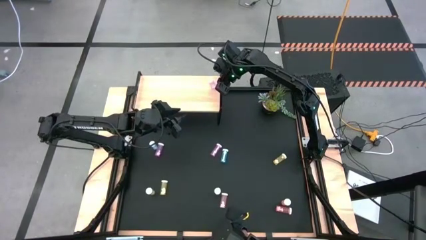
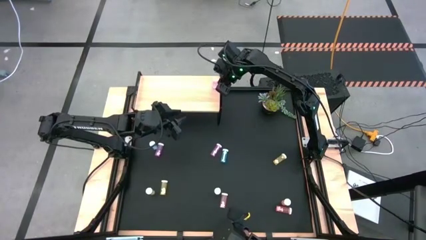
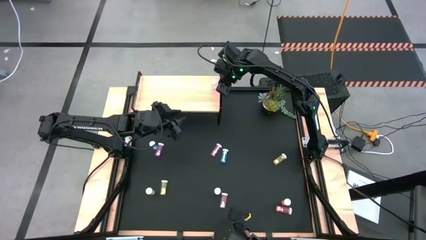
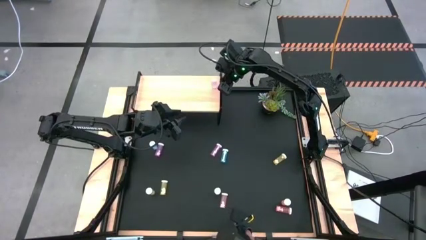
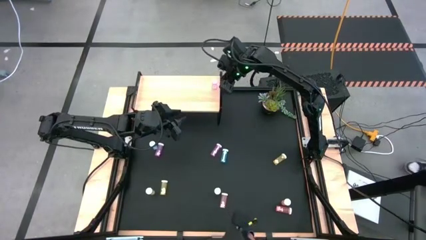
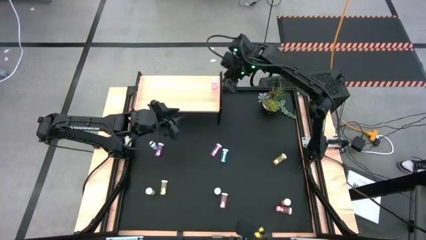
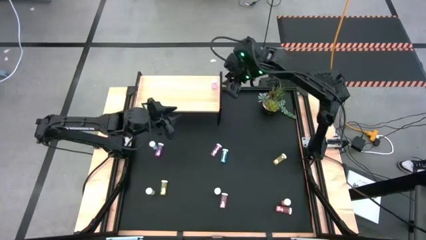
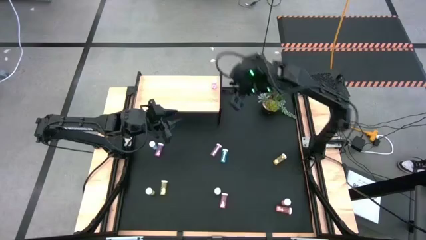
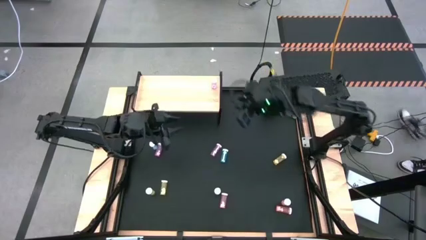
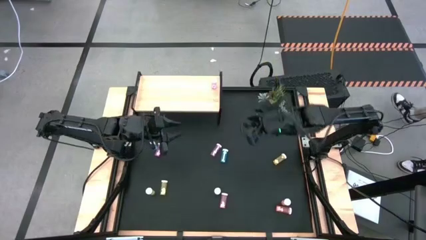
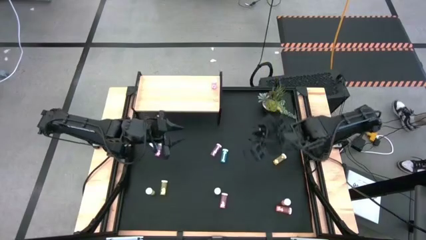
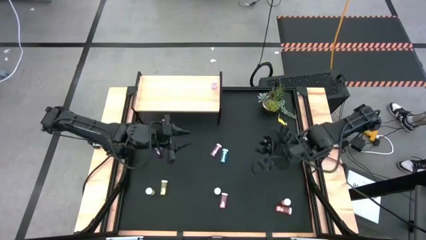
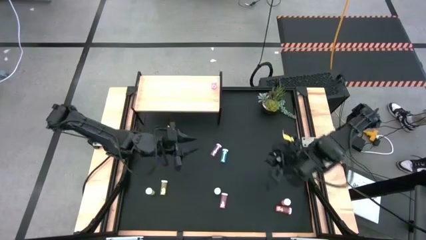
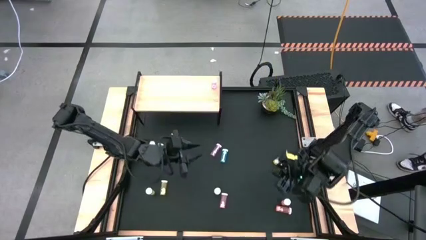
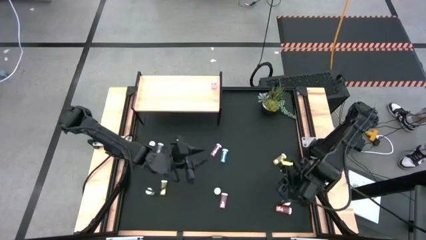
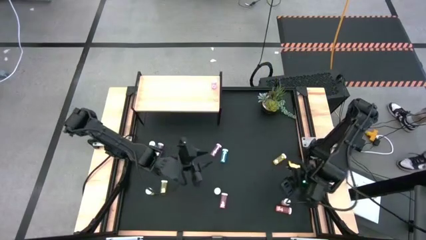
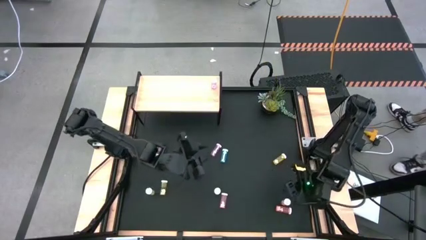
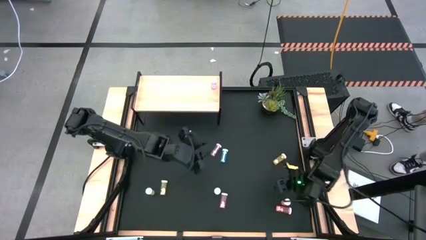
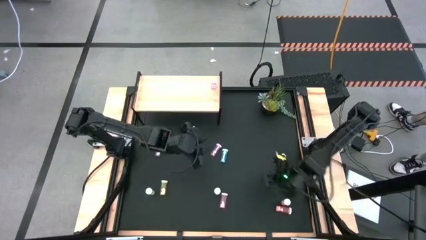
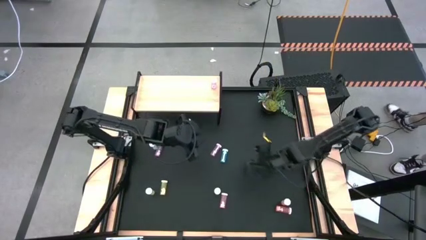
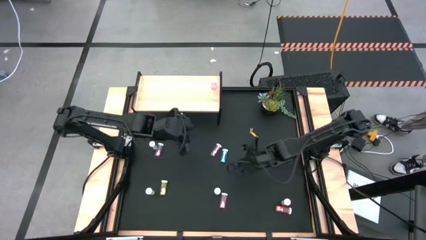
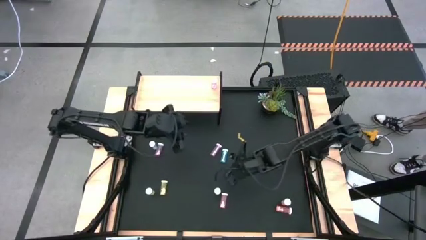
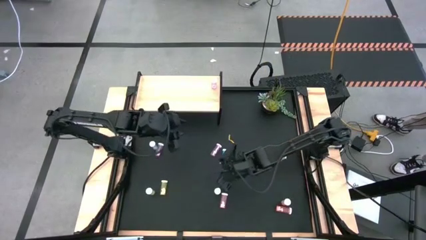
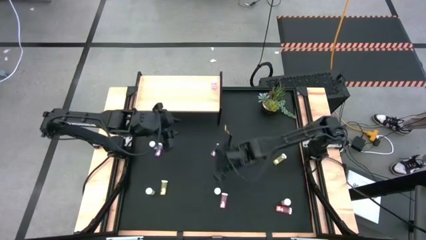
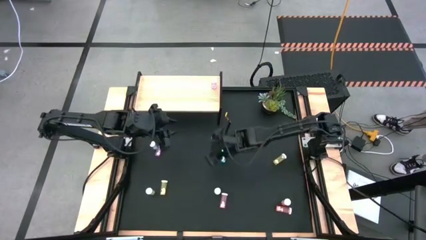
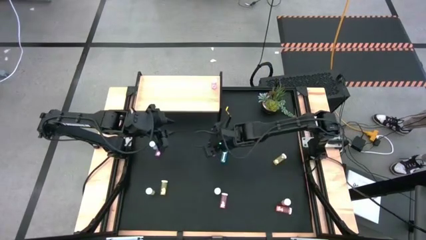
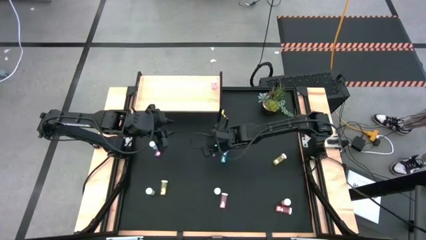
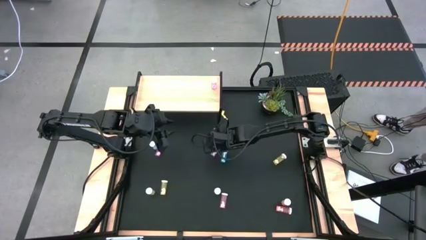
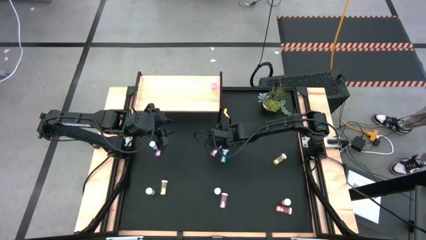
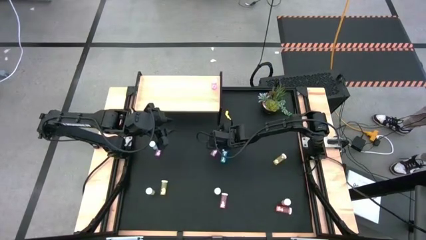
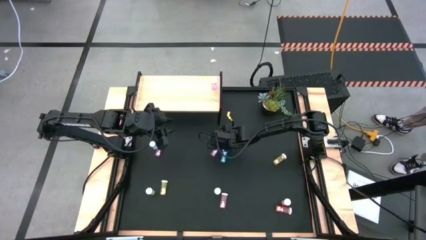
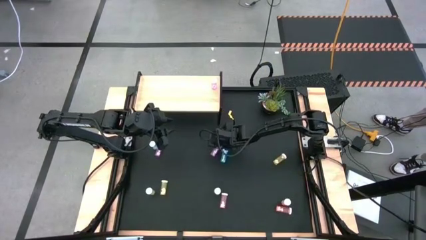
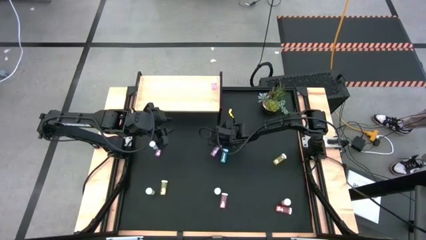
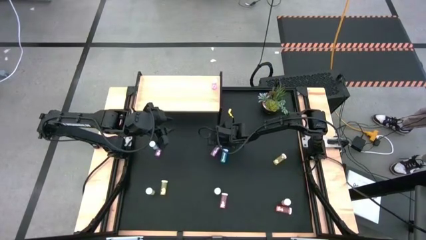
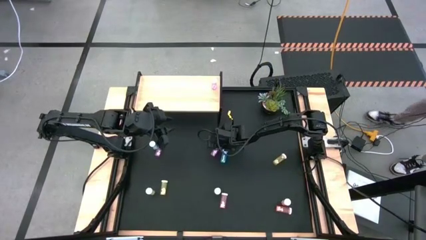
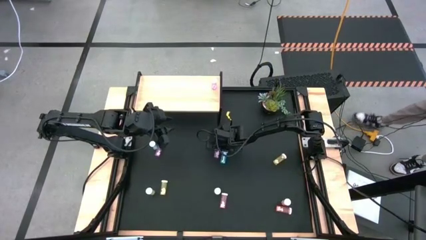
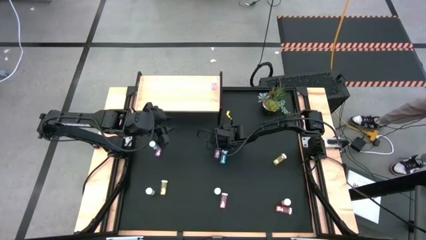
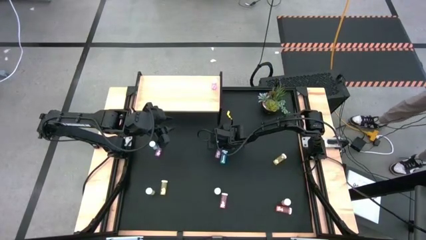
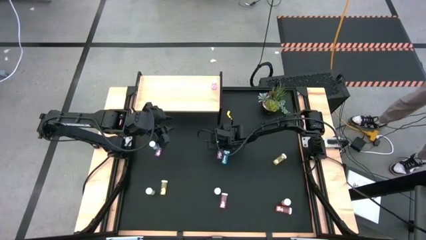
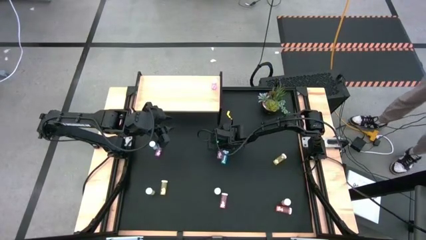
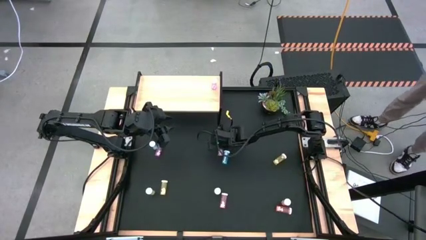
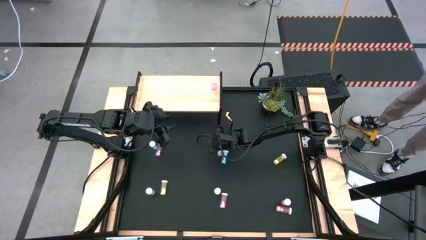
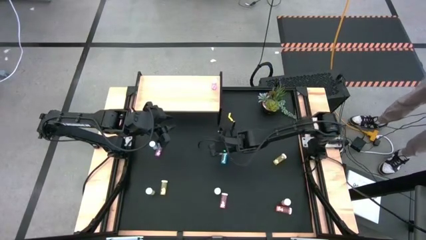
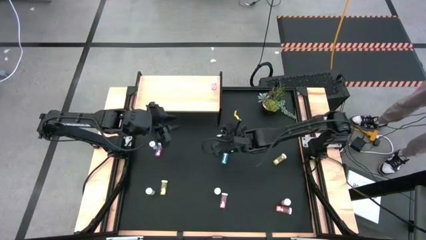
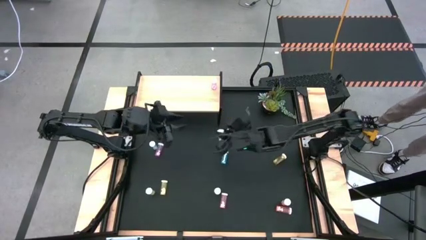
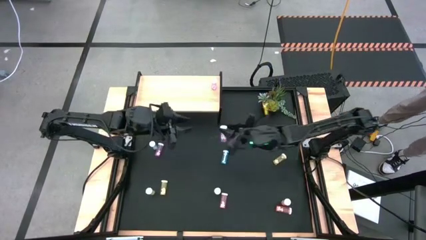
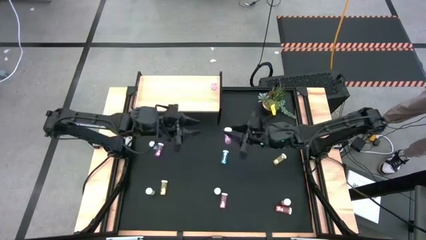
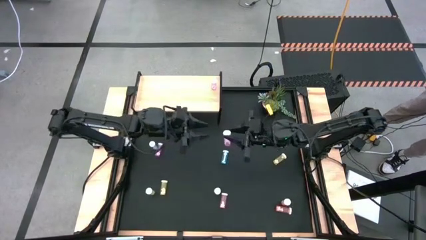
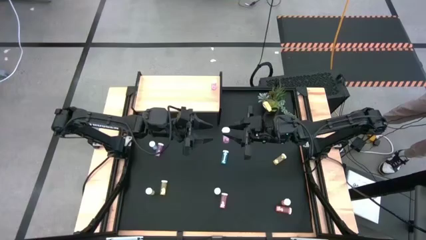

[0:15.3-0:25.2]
Task: Pick and place medicine bottles onto shelf by color
Put the right pink pill bottle on the shelf aligned with the other pink pill bottle

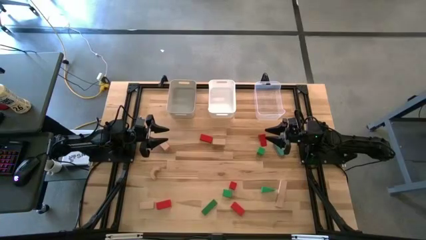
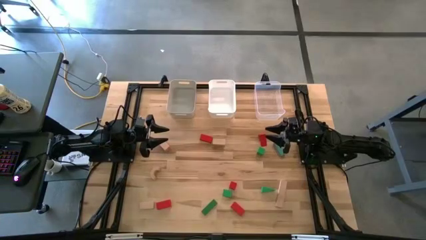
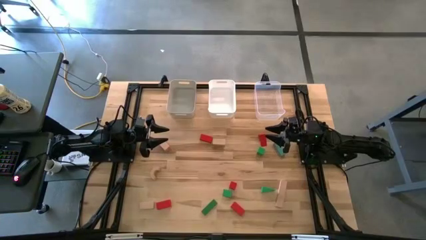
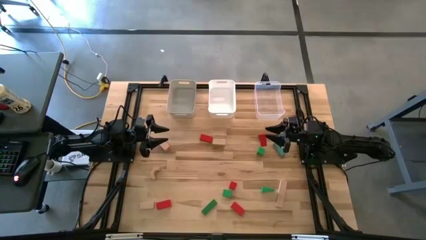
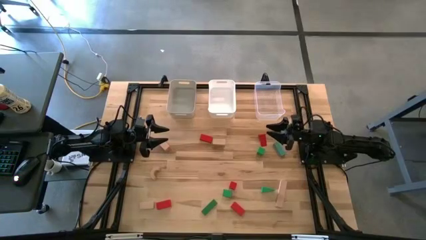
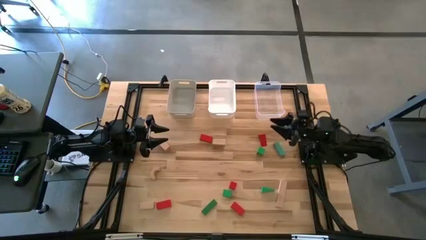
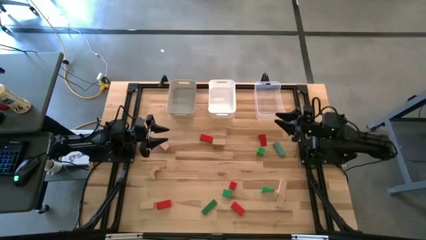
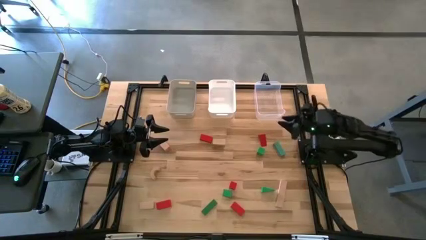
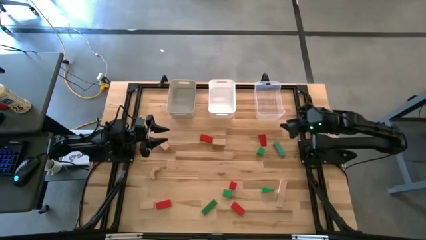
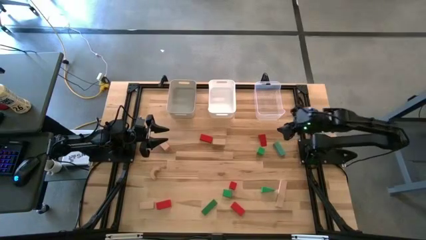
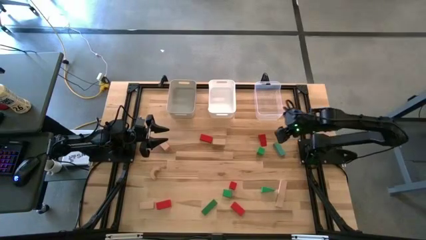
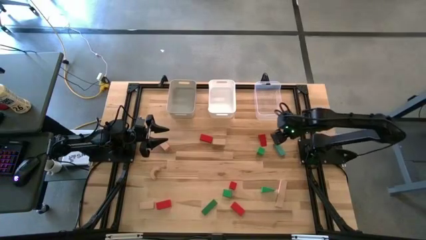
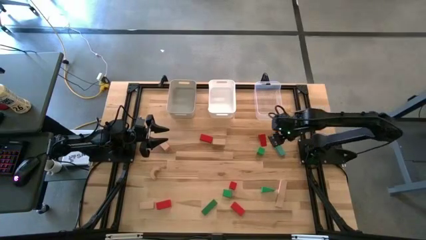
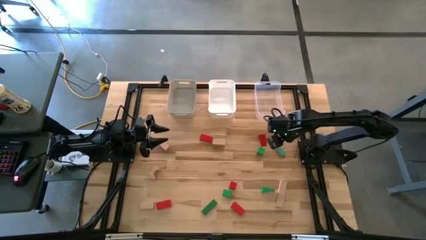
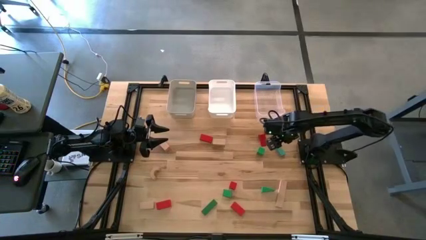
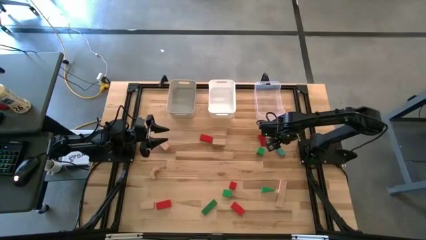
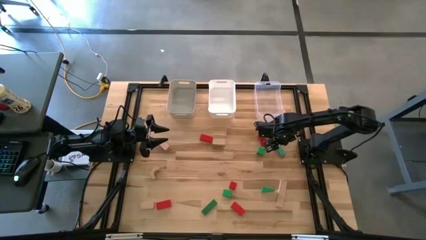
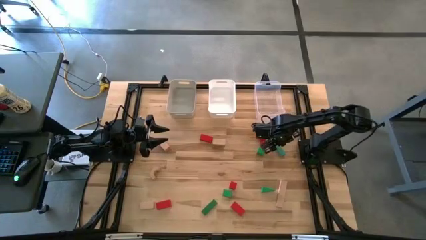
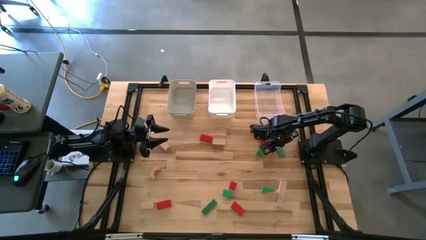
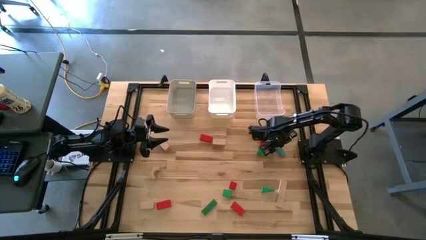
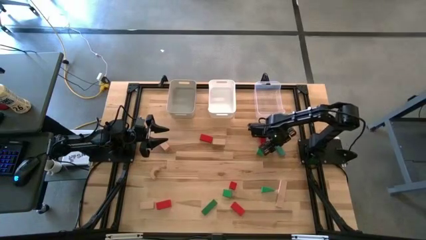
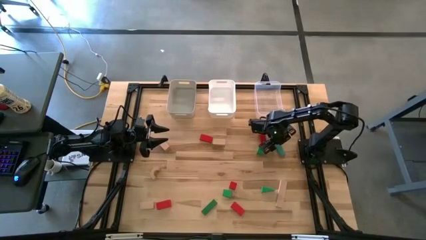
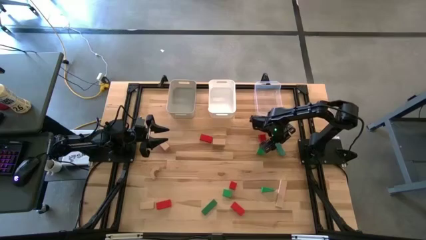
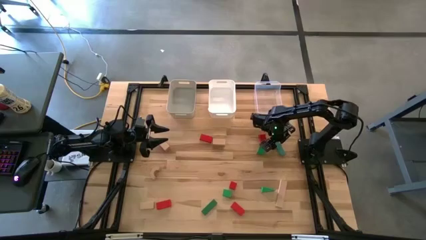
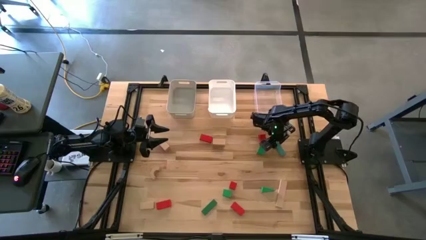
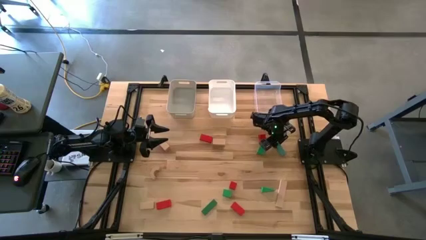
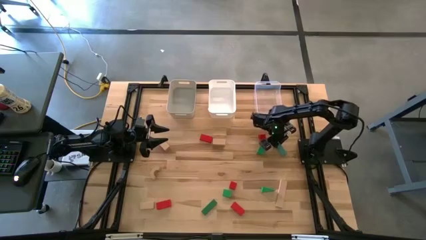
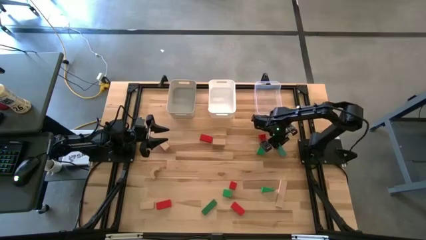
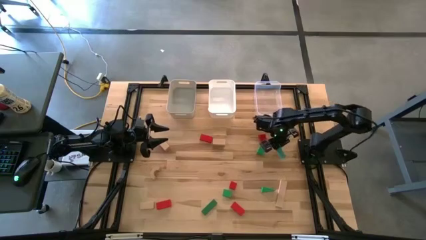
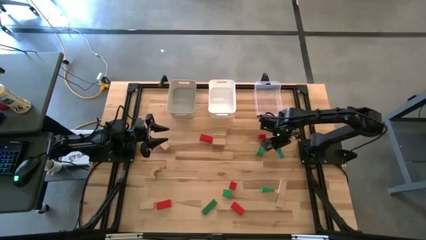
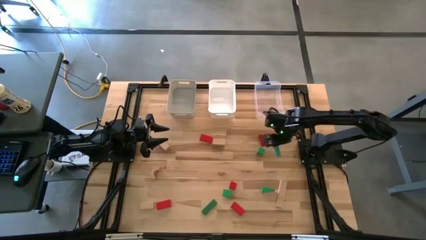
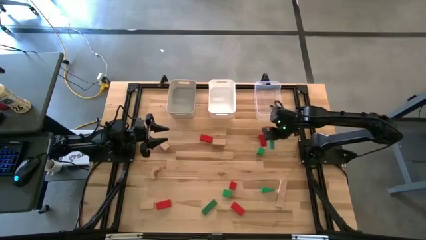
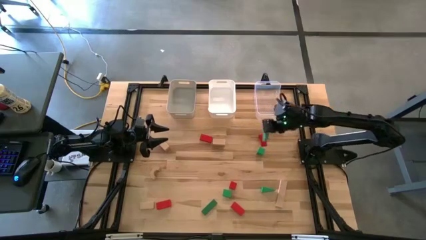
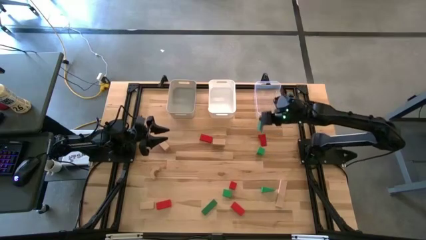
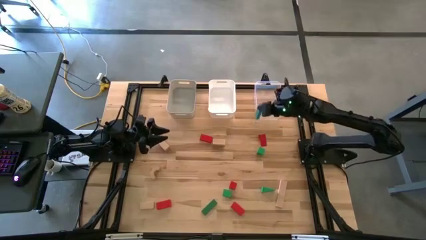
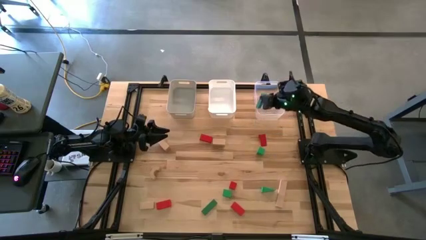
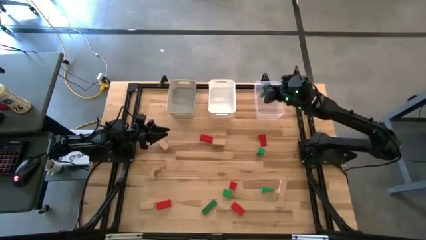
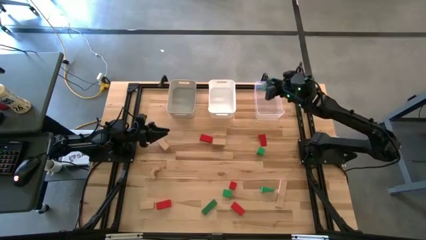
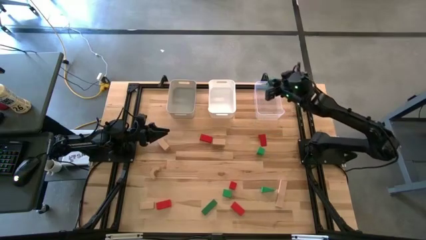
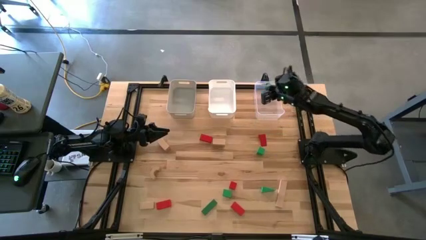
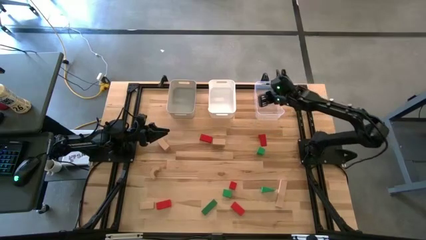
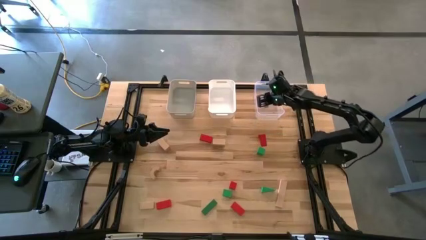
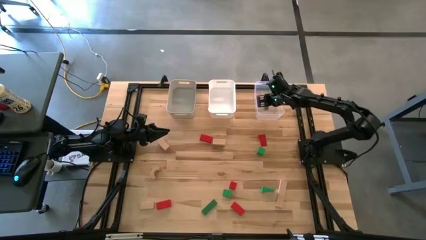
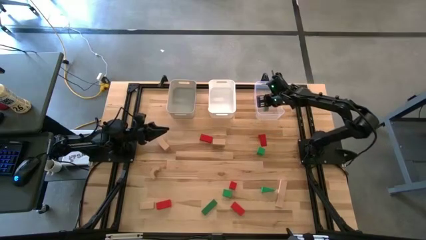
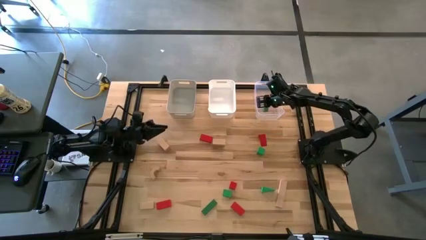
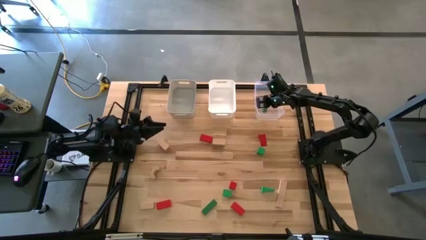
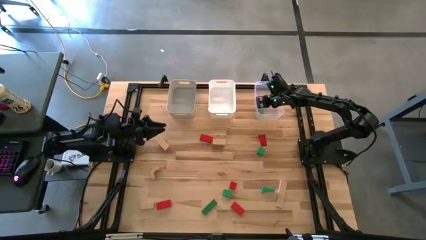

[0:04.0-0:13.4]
Task: Sort & place blocks by color
Put the green block into the transparent bin
